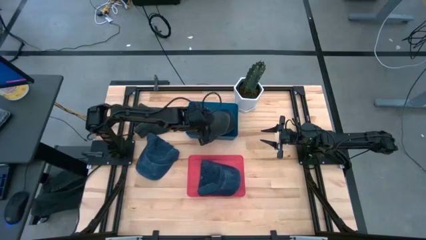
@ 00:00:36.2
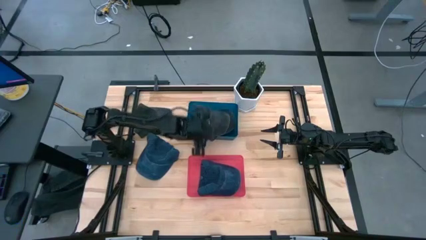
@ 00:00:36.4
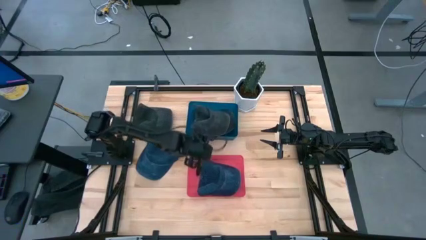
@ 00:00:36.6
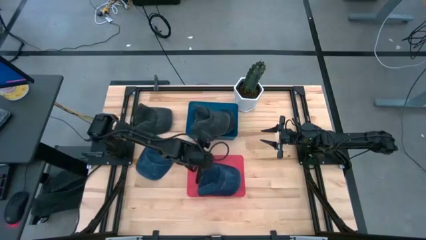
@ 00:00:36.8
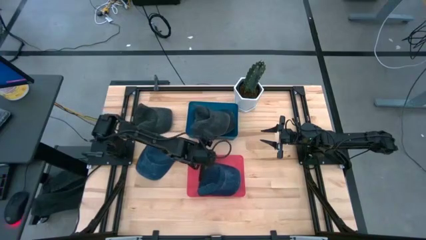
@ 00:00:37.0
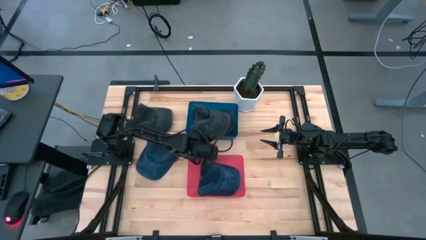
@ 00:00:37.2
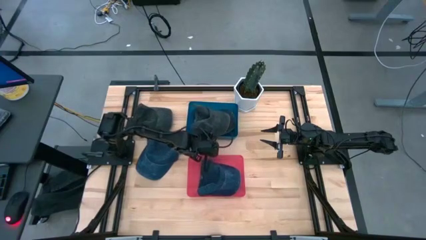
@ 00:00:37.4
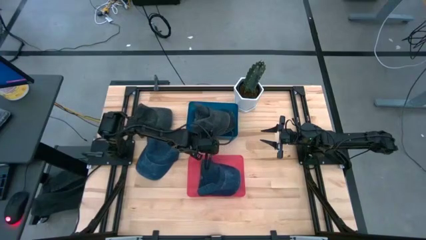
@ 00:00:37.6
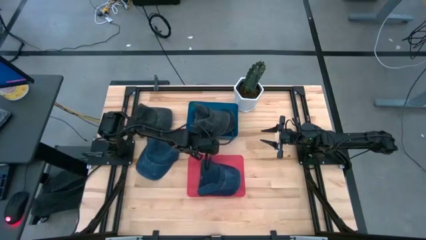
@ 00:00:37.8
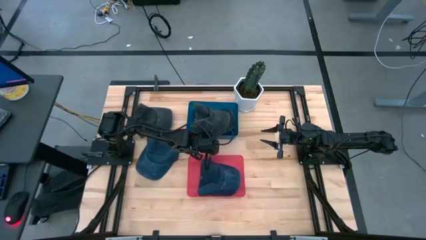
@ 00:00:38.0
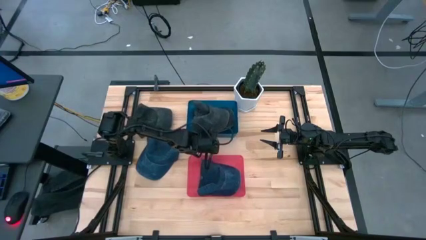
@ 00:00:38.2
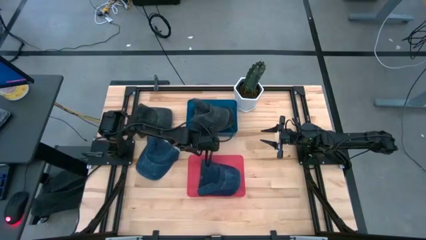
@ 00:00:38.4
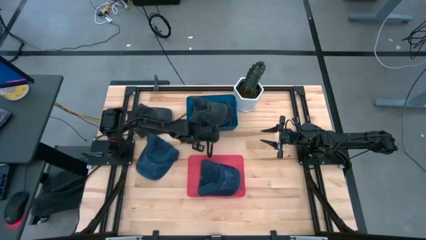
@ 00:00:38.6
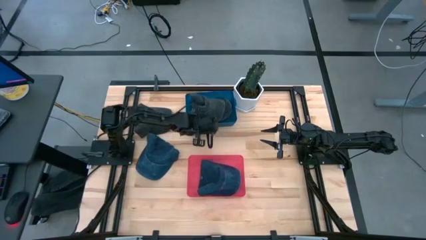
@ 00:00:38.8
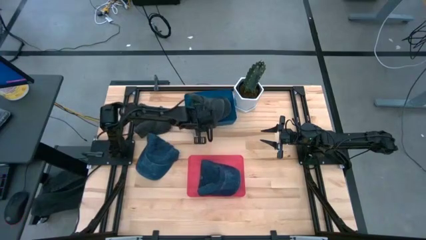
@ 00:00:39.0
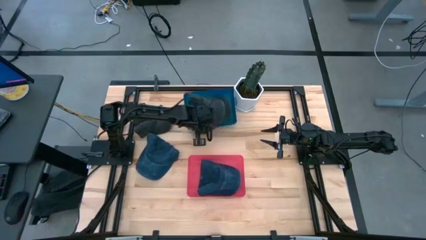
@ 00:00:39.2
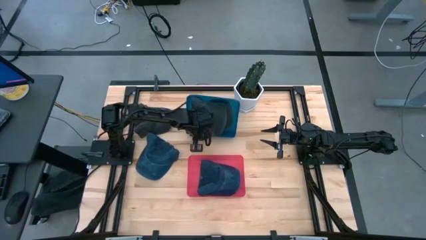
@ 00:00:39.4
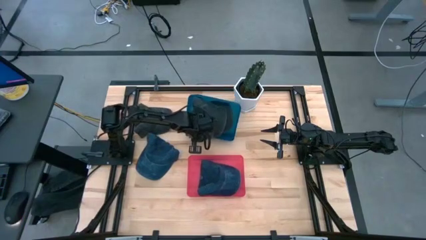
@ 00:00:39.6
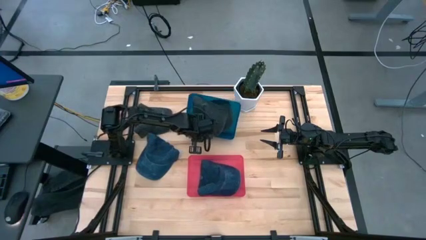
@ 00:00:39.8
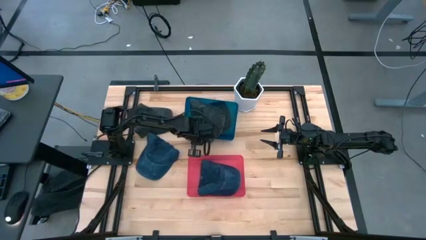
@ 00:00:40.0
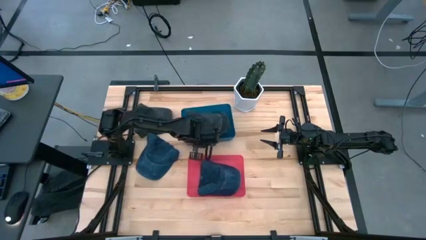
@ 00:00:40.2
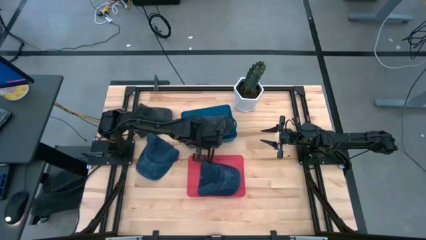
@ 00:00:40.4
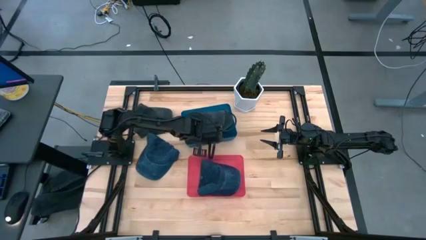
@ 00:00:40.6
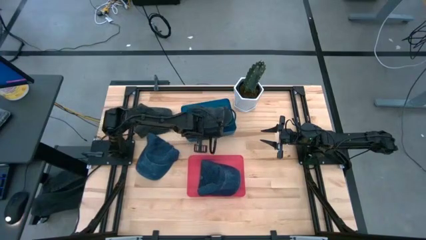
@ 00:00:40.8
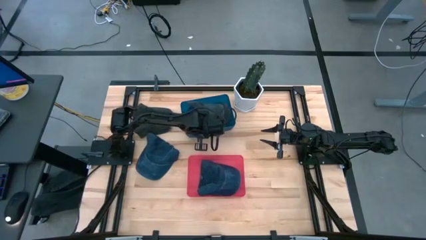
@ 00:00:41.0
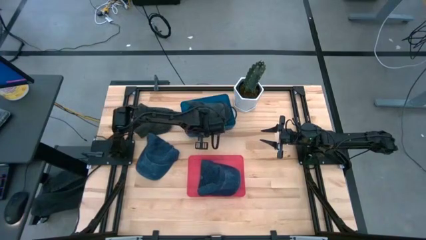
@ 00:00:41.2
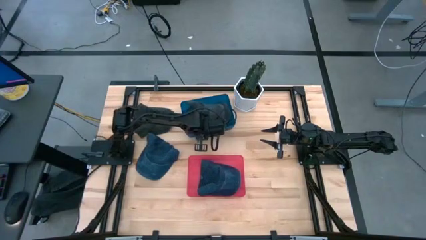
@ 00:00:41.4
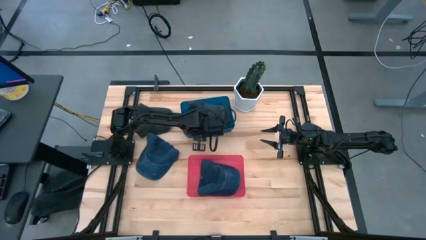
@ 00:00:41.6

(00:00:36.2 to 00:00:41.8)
Task: Pick & Place hat
Adjust the bottom black cap in the blue bin

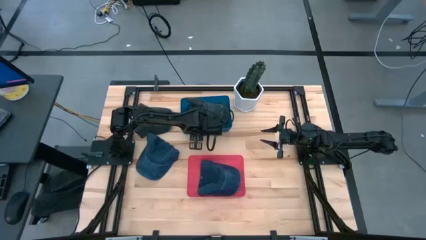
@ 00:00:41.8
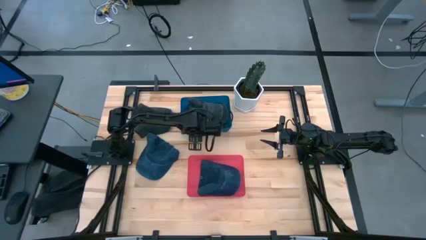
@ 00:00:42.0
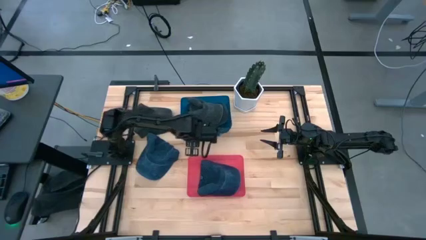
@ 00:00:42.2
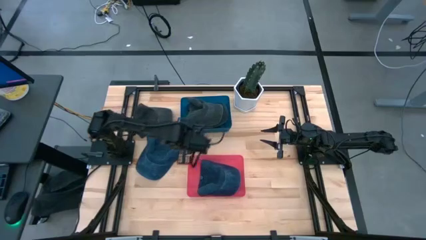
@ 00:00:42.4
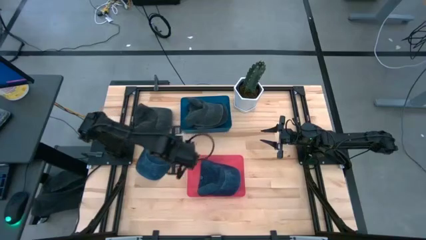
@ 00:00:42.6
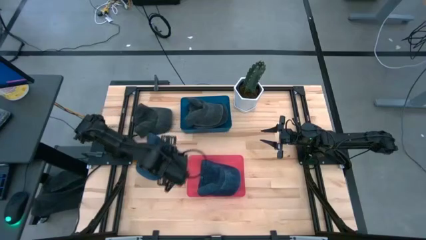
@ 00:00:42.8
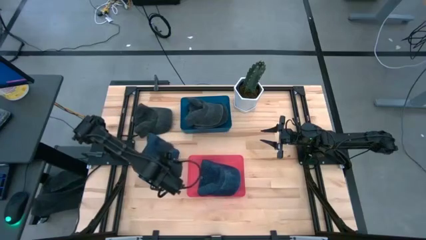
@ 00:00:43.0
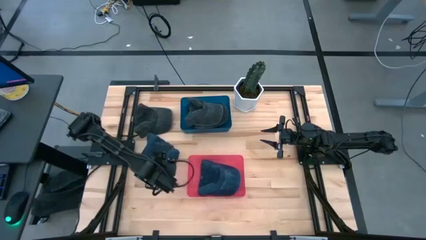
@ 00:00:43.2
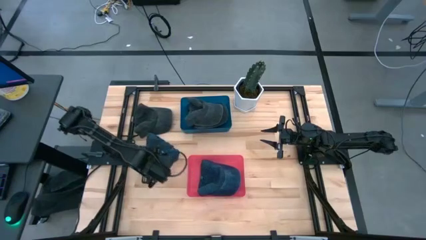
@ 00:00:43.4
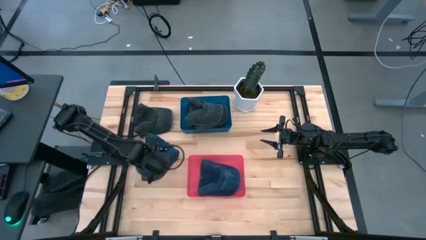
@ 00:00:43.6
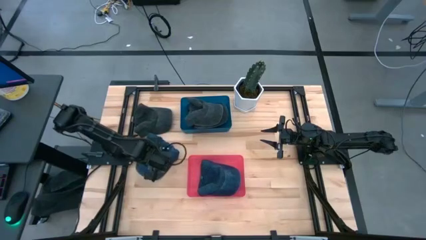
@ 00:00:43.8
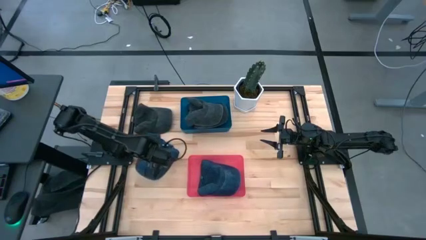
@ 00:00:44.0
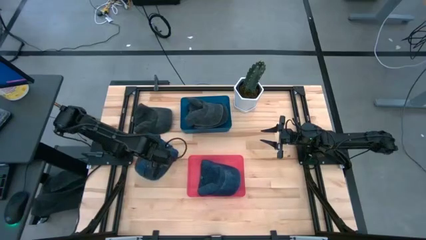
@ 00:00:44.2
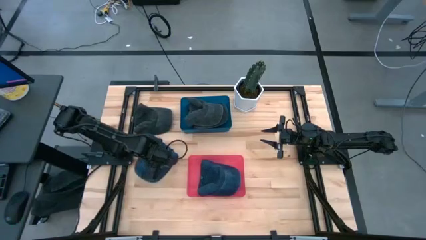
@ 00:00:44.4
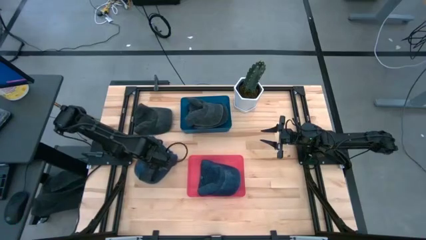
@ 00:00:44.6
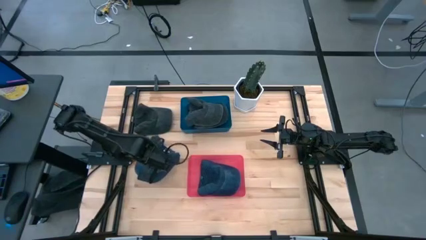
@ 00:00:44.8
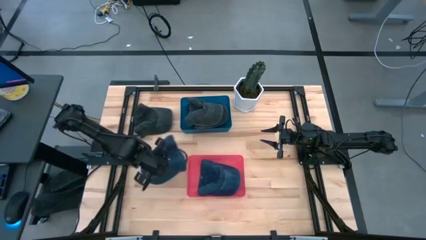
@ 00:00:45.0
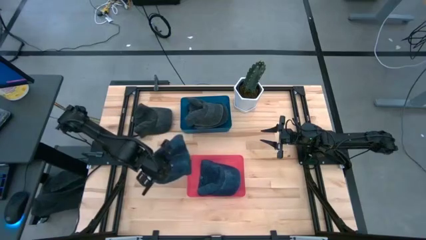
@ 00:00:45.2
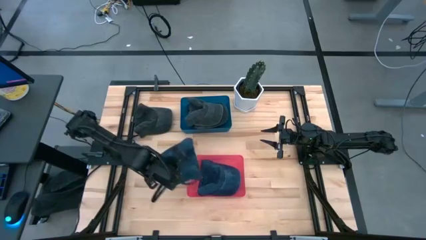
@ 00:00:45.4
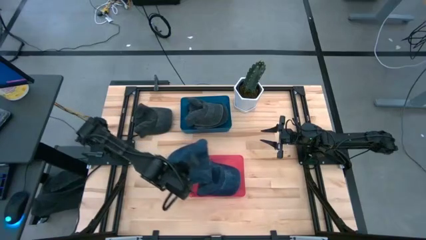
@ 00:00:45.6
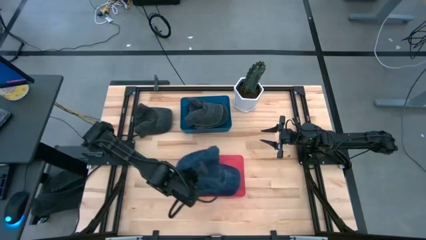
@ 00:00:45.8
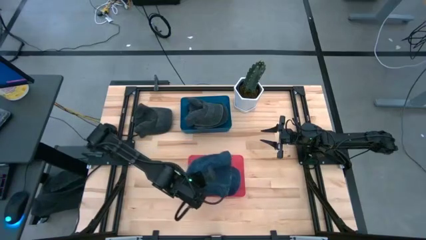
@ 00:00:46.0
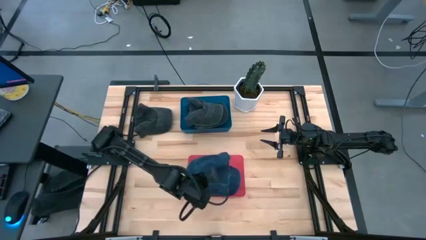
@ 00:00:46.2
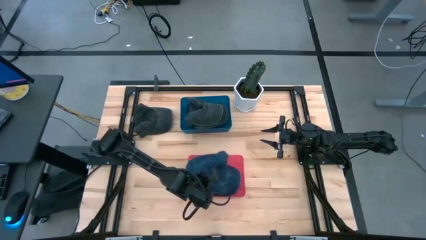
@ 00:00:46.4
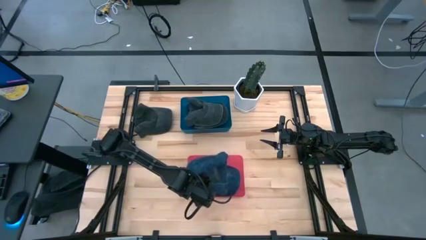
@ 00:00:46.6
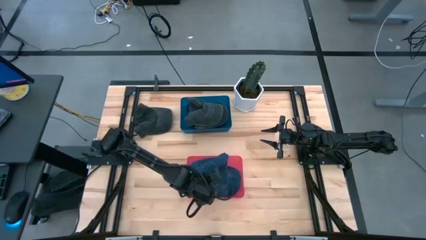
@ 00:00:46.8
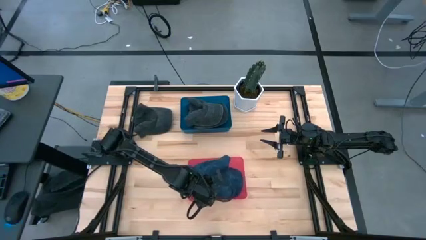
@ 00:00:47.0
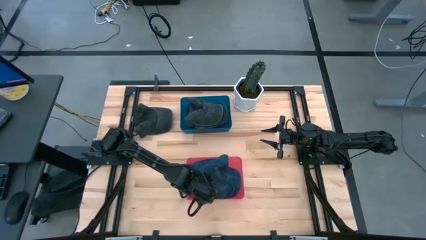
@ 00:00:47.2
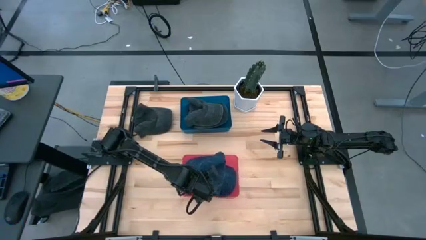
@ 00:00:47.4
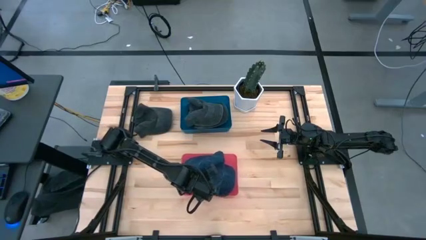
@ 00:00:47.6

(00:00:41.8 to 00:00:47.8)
Put the blue cap into the red bin

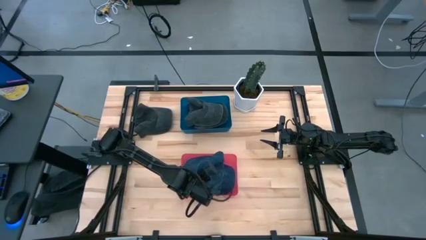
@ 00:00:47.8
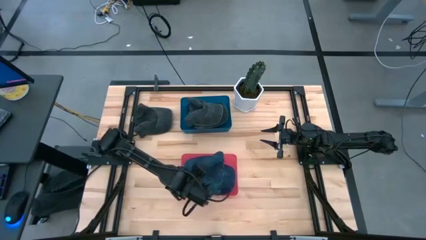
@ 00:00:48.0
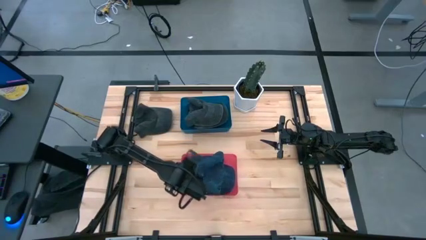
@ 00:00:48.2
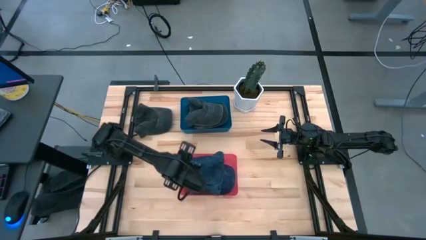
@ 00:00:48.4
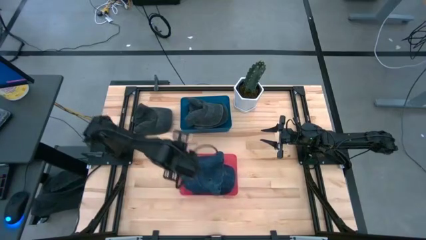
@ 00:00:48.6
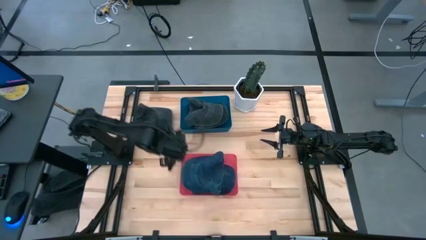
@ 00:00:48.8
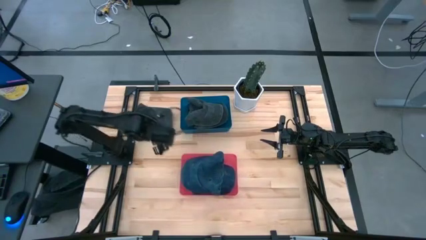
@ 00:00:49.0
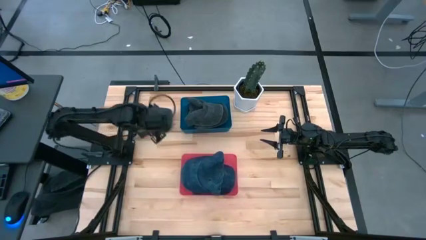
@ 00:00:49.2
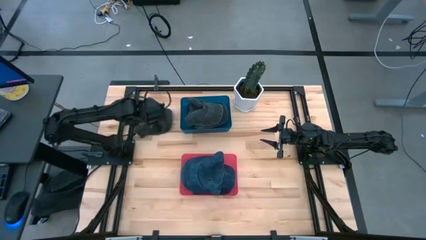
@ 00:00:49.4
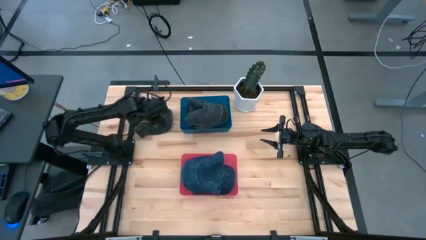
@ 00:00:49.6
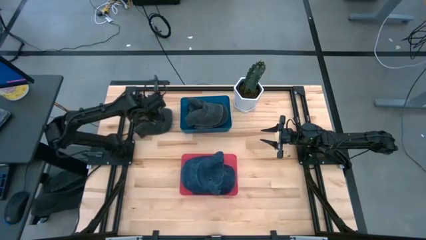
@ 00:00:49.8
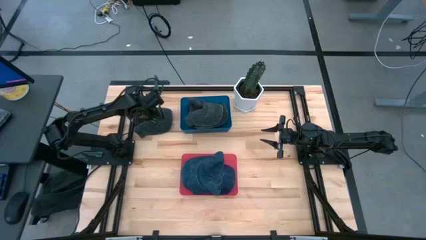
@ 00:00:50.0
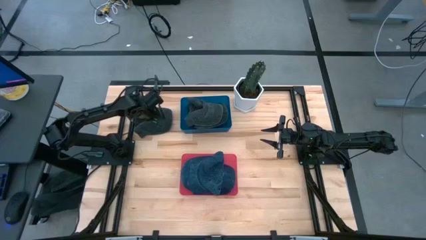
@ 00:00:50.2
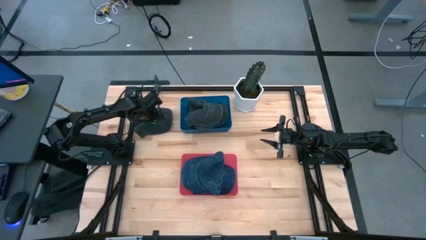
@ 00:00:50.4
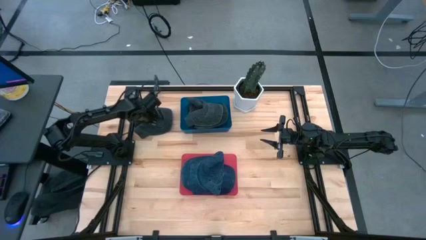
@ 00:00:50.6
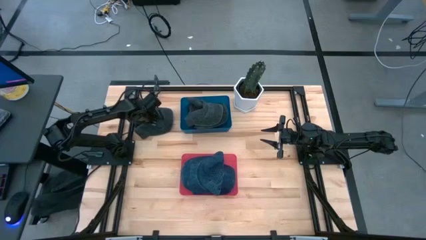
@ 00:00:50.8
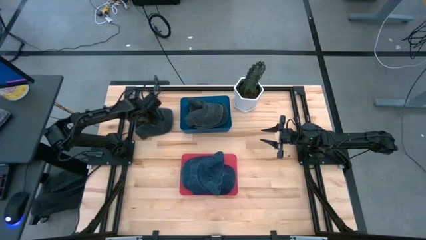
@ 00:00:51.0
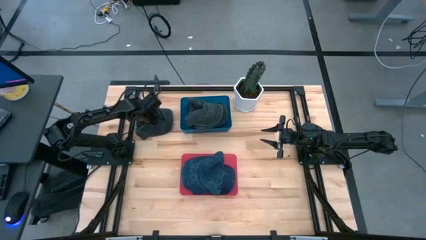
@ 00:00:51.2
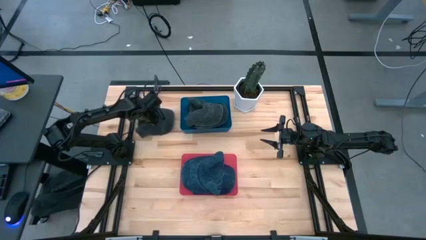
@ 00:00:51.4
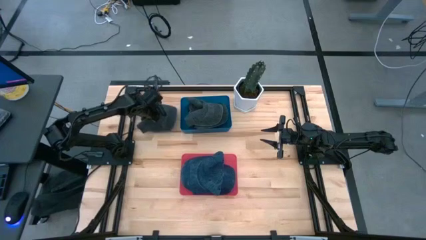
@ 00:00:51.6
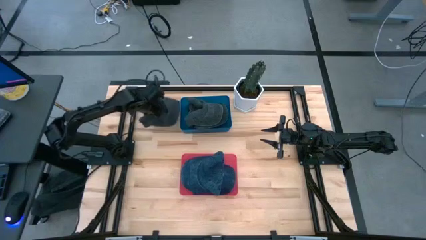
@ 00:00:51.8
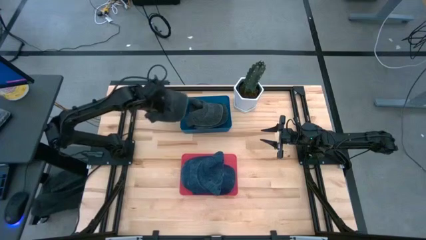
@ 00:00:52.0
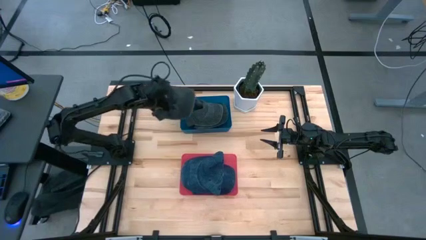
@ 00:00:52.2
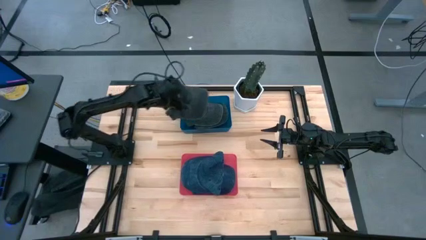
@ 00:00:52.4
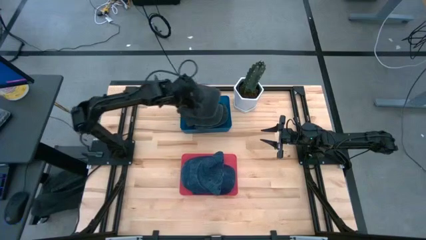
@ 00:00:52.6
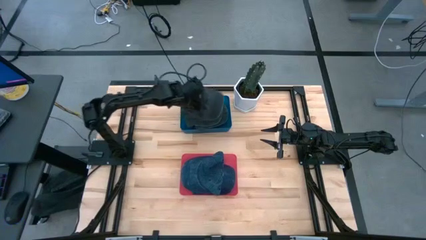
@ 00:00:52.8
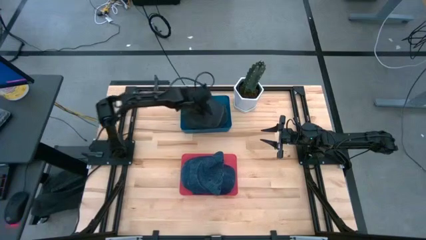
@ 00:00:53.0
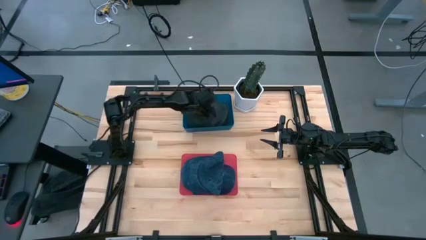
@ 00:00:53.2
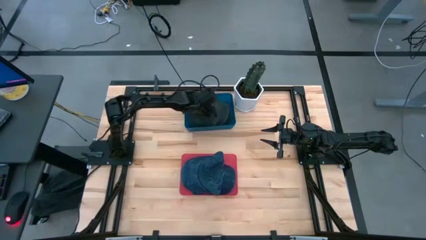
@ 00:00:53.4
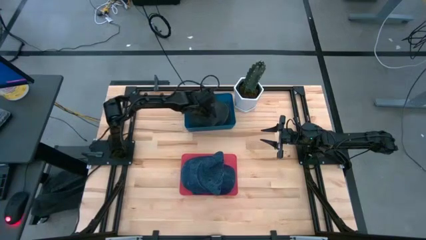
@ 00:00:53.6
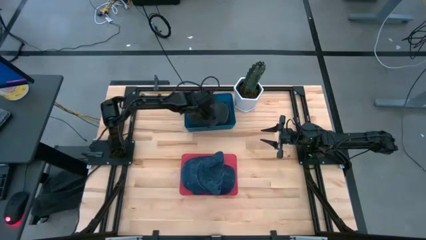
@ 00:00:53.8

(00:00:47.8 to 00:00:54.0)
Put the black cap into the blue bin
